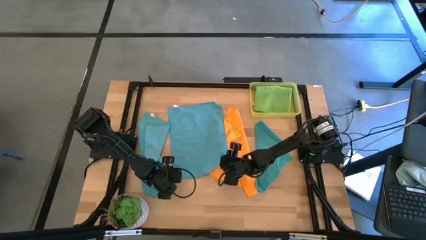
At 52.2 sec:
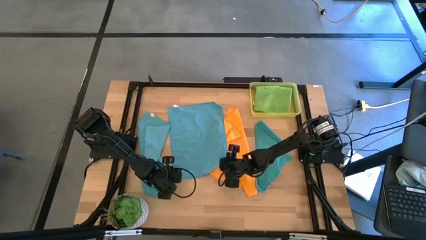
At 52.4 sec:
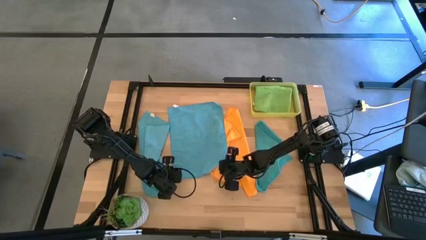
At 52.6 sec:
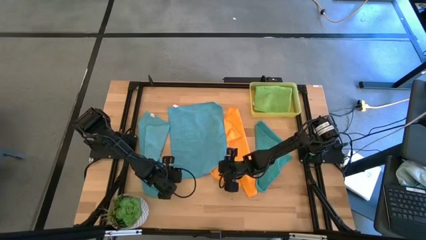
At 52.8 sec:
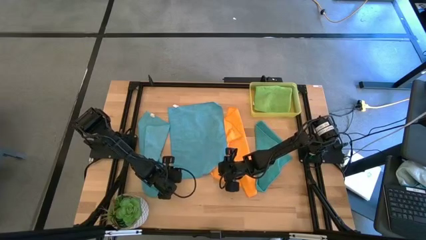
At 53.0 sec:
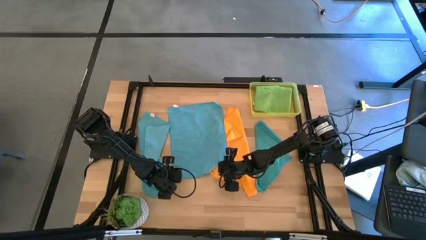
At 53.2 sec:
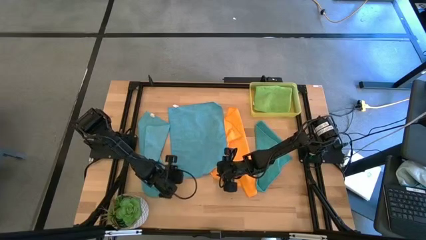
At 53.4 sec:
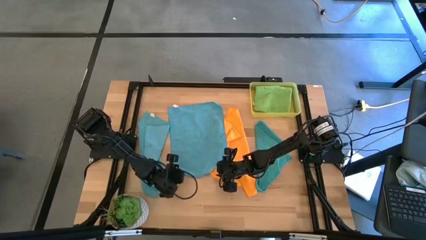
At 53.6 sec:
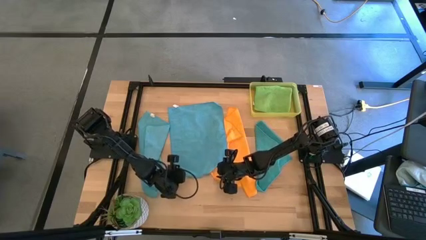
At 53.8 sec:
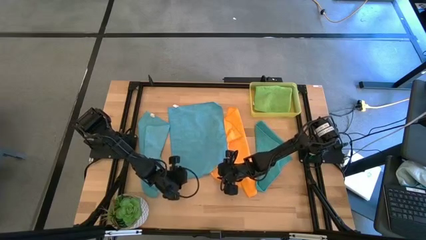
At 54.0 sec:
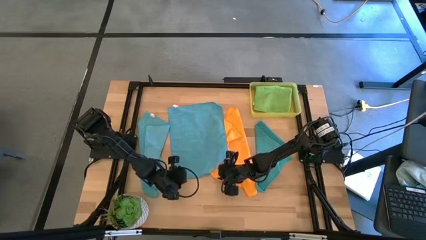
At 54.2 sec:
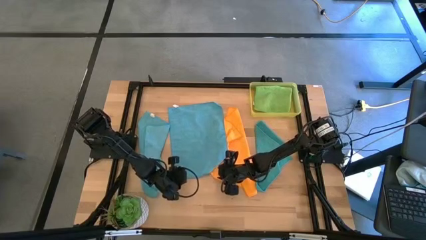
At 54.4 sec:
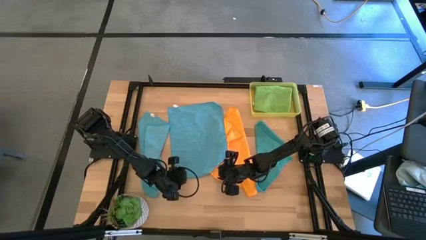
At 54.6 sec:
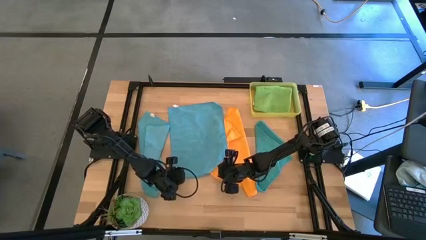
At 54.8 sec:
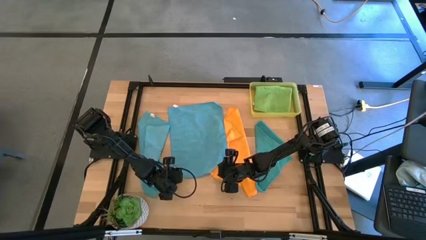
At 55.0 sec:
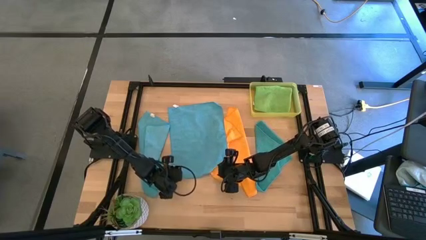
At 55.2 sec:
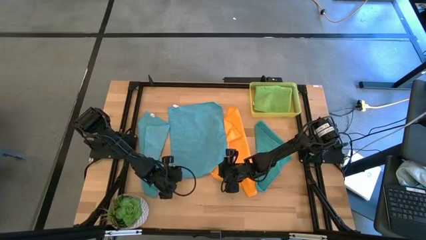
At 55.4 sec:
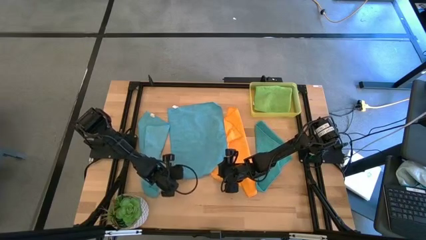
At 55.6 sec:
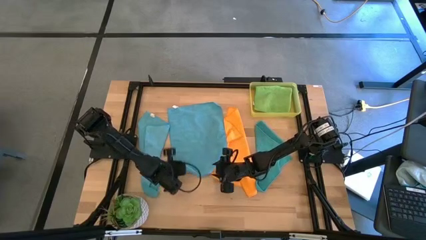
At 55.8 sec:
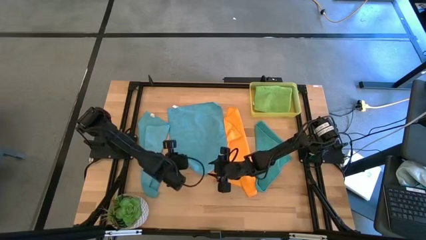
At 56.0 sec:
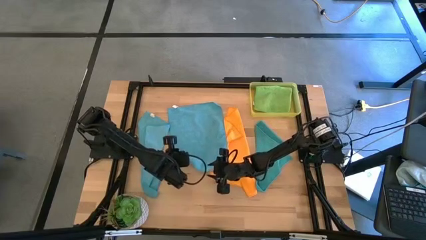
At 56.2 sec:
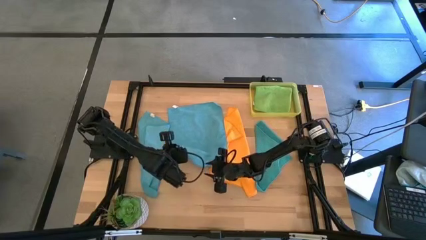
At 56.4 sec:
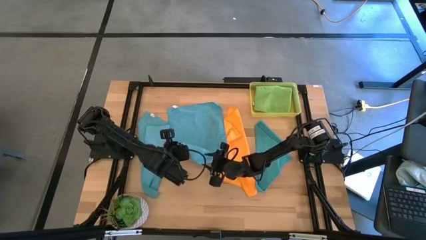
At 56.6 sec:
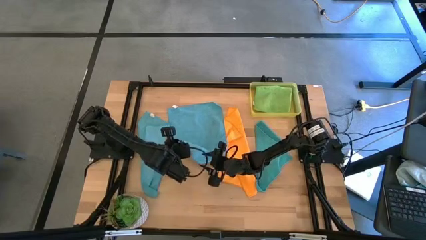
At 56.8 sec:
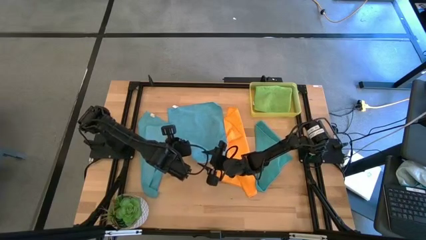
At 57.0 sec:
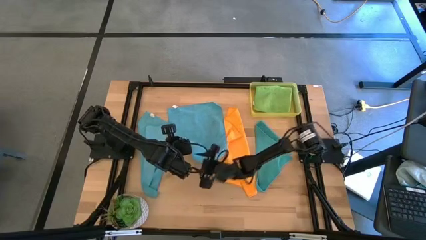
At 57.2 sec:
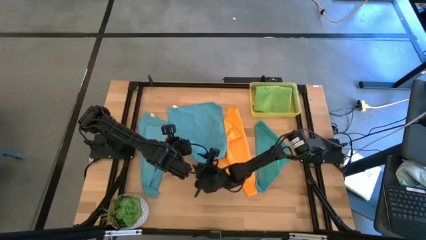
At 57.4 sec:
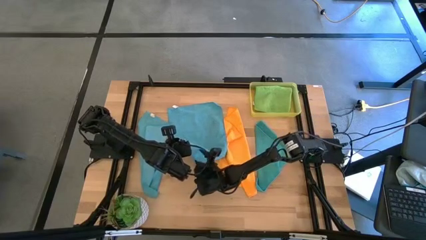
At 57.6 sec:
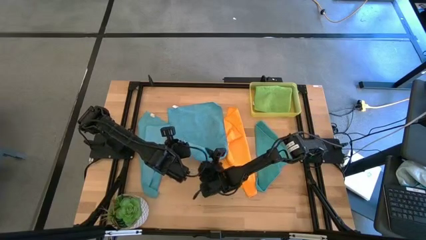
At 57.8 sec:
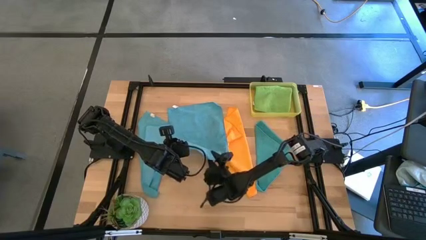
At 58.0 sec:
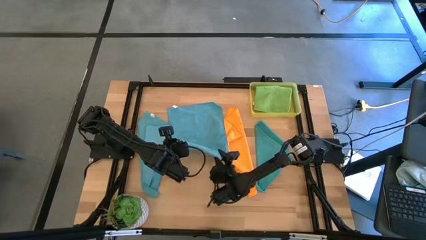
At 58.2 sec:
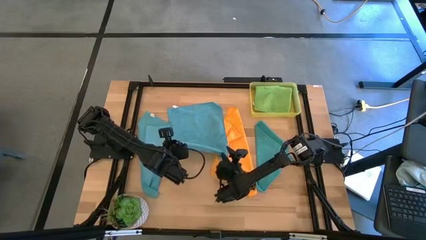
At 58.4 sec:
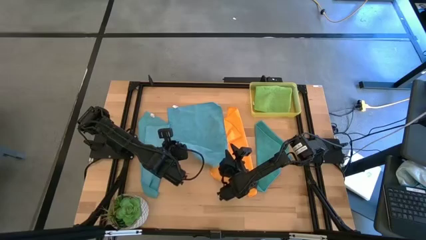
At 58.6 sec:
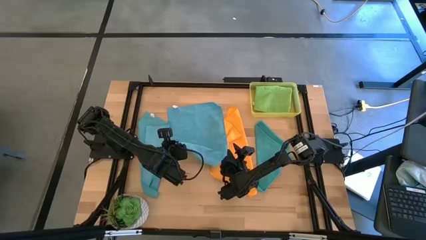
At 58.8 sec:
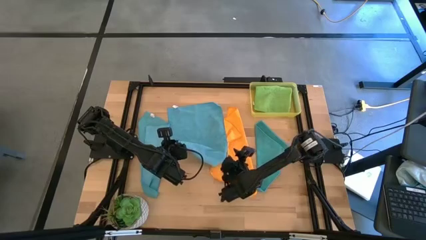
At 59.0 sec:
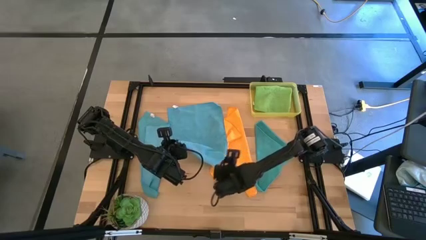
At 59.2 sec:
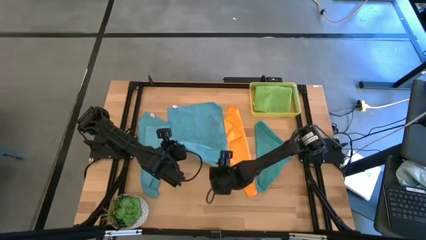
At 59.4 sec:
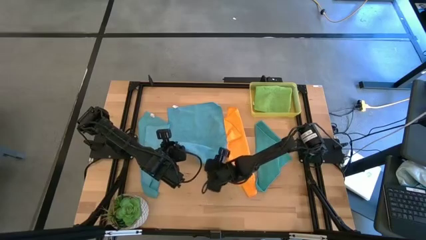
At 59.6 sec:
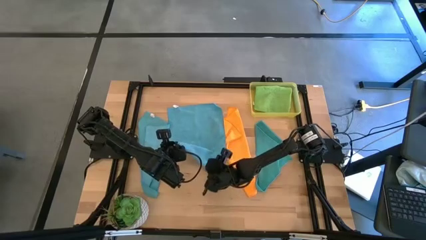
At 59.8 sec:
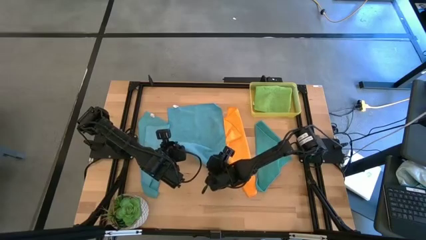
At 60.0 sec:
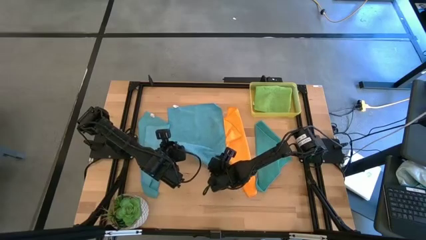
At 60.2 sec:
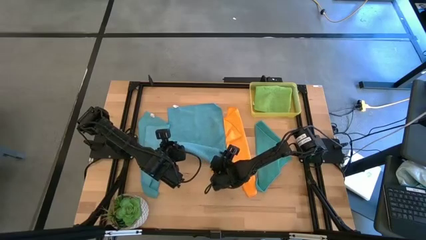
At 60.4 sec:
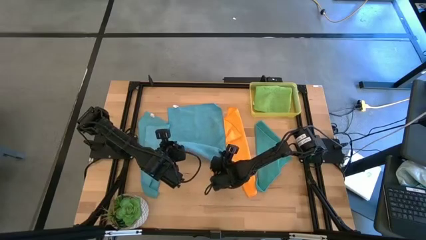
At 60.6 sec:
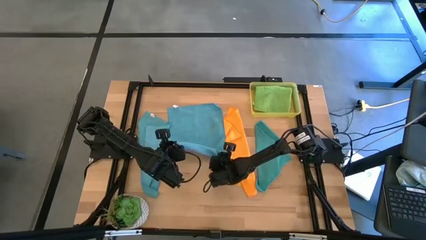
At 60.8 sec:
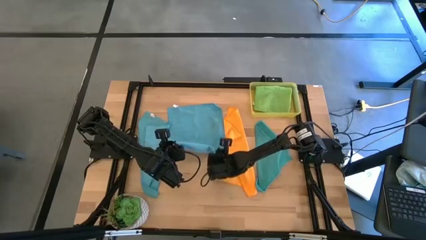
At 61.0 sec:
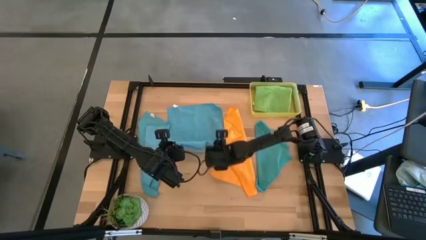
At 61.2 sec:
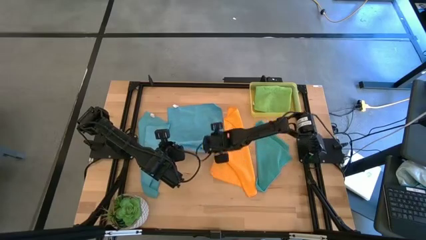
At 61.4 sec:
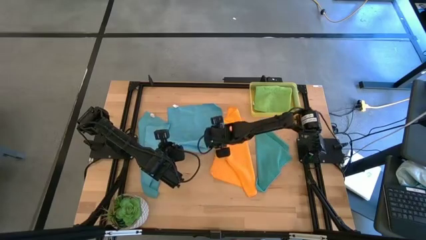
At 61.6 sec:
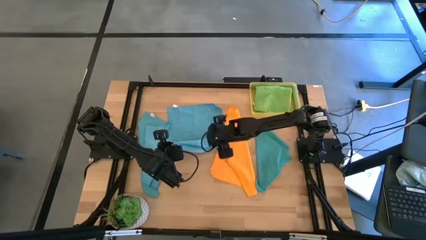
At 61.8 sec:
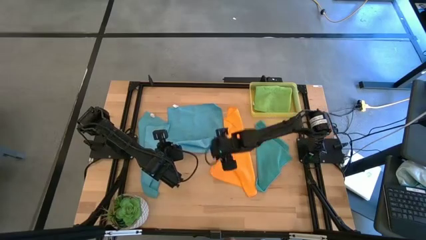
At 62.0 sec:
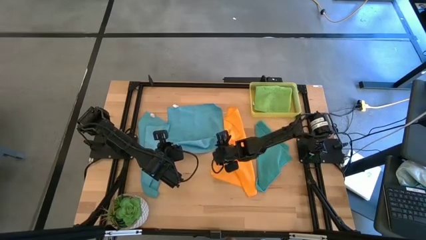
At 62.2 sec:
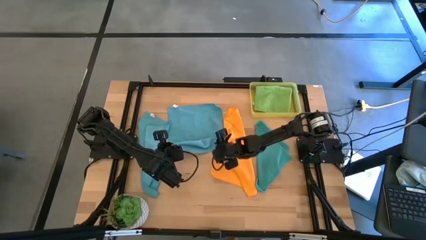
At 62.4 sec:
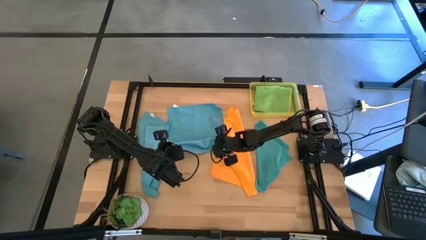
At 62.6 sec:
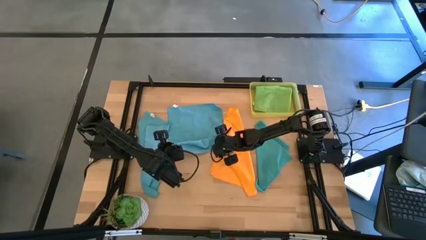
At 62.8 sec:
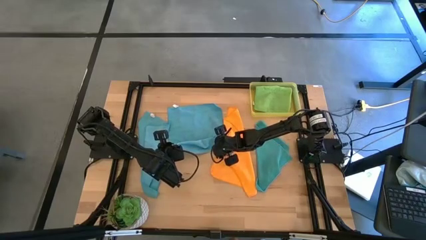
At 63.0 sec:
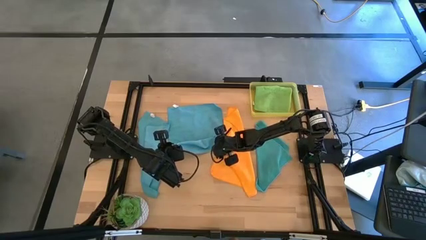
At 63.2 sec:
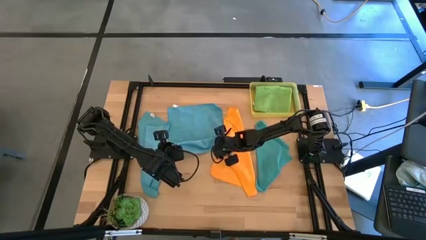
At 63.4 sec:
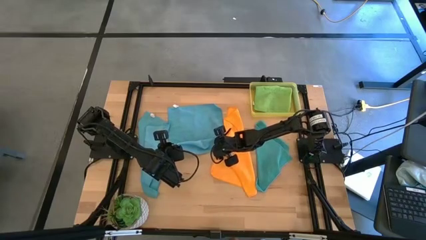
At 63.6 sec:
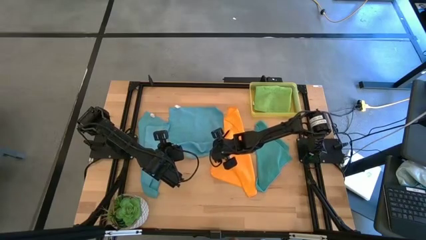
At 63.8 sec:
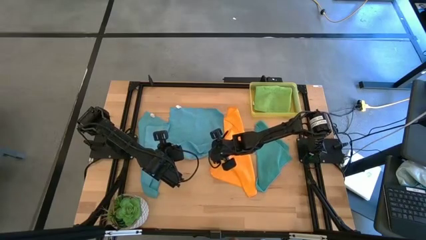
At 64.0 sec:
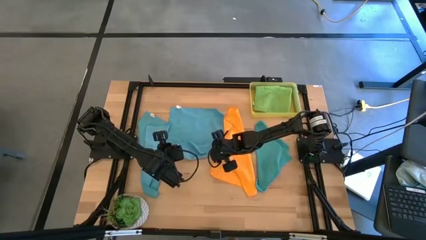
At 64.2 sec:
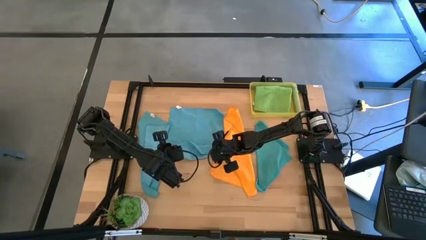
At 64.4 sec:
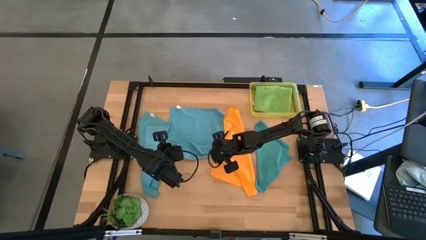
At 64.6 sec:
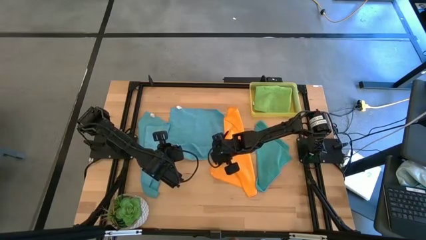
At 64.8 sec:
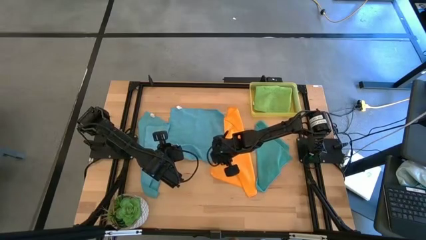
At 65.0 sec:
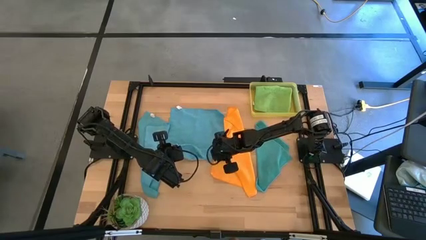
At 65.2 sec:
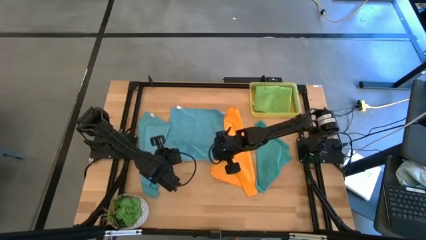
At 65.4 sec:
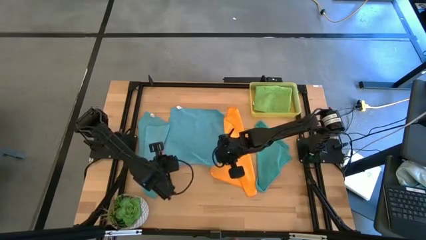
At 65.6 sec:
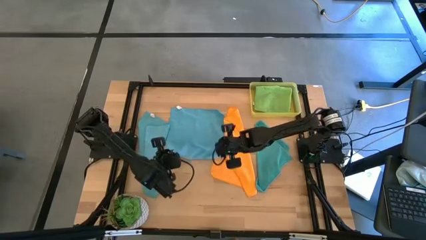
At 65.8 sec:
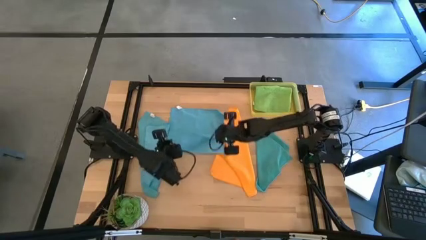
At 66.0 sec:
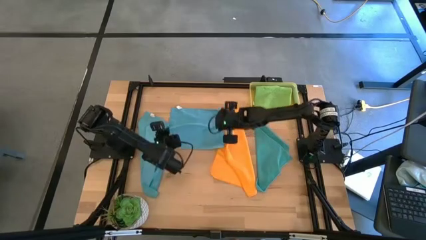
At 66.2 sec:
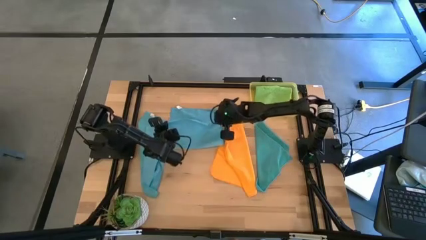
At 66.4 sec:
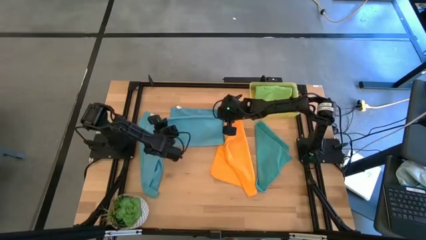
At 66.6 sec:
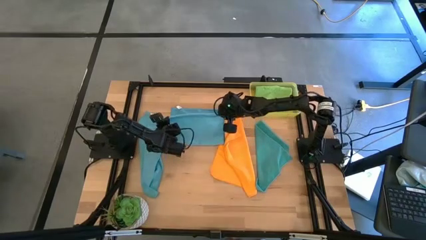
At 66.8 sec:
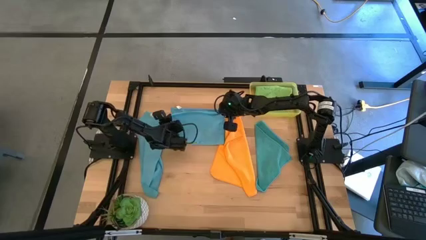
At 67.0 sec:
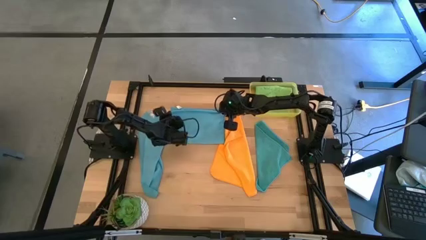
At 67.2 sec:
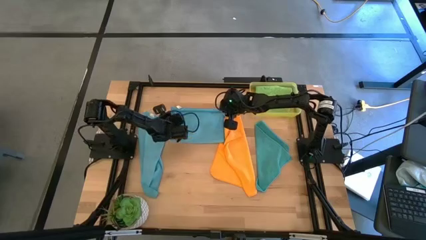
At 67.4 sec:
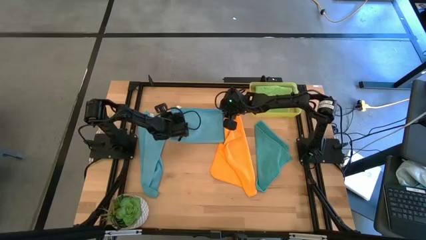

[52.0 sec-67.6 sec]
Task: Fold microfiber towels
Fold the middle blue microfiber cloth
